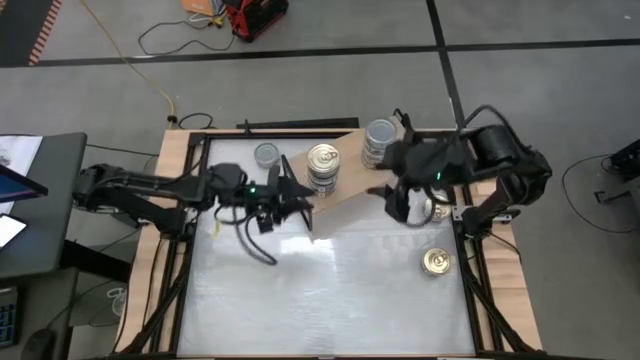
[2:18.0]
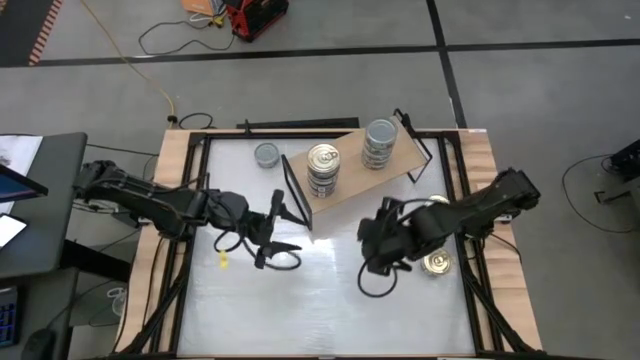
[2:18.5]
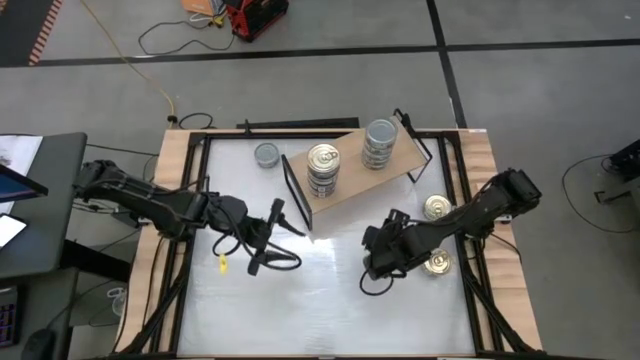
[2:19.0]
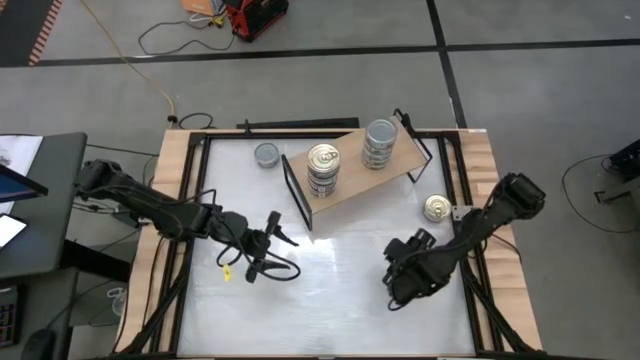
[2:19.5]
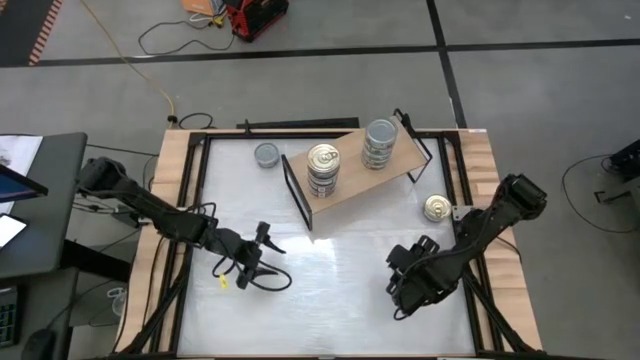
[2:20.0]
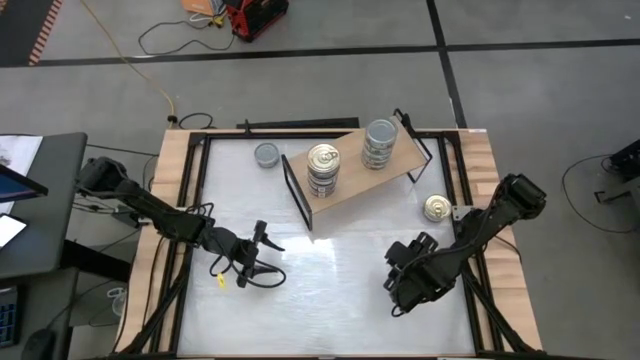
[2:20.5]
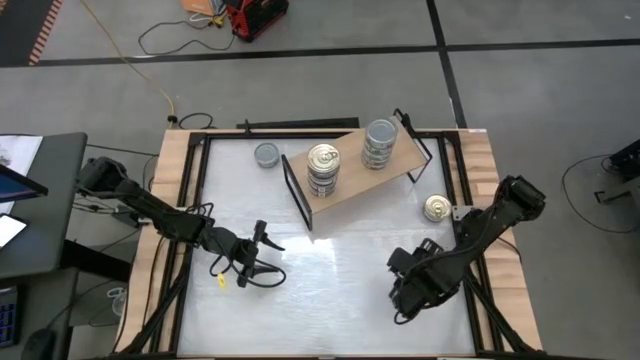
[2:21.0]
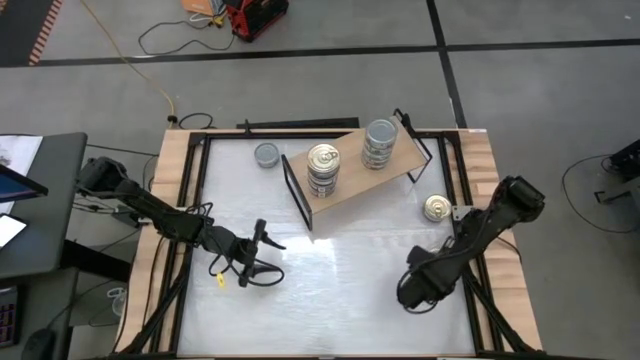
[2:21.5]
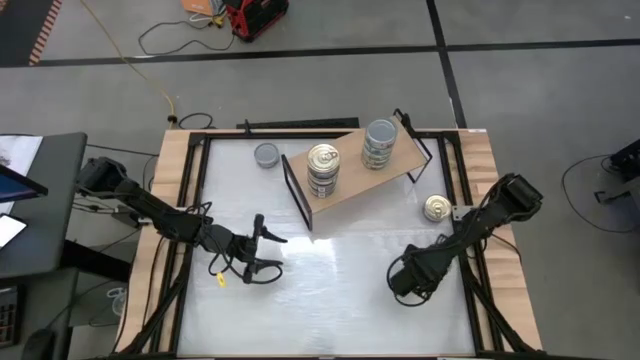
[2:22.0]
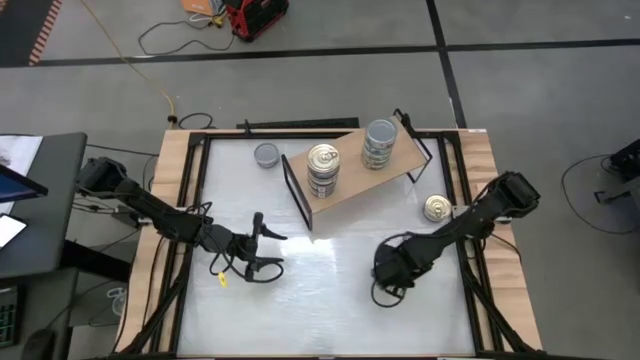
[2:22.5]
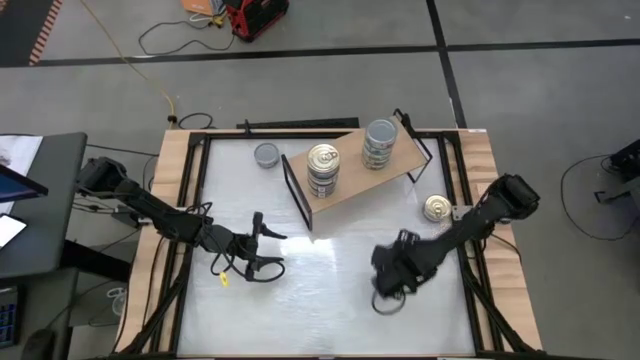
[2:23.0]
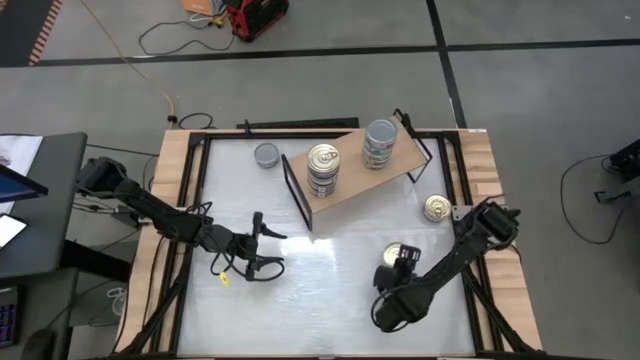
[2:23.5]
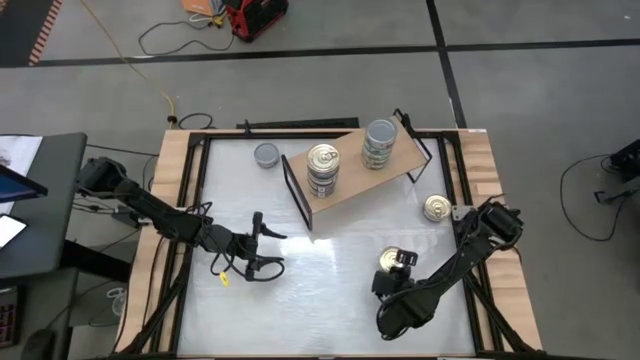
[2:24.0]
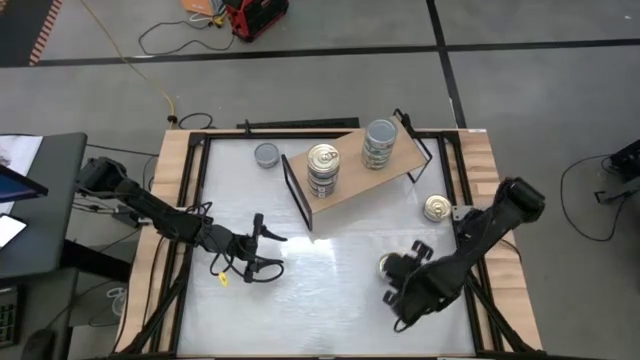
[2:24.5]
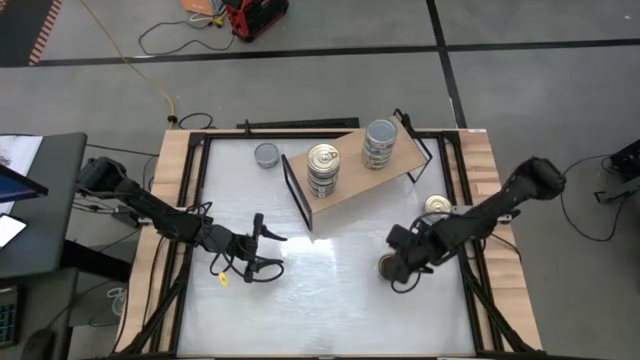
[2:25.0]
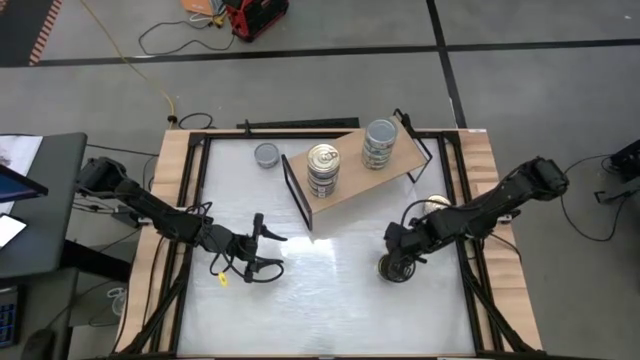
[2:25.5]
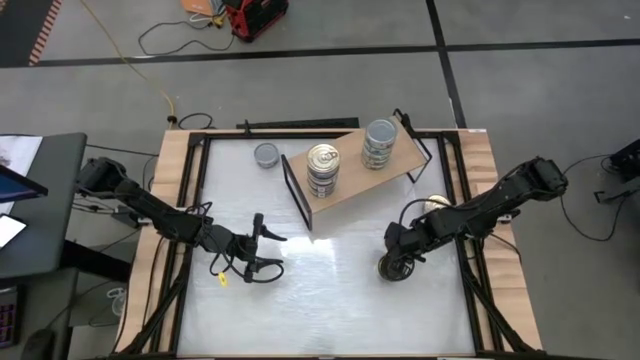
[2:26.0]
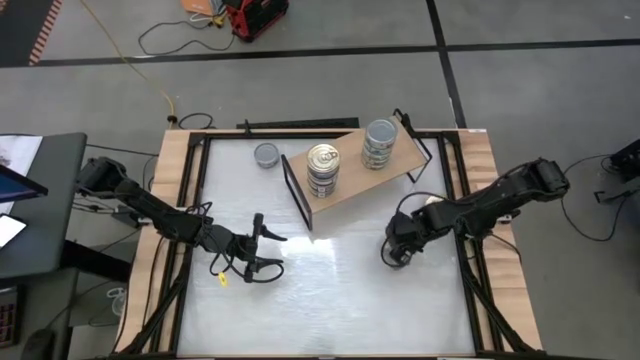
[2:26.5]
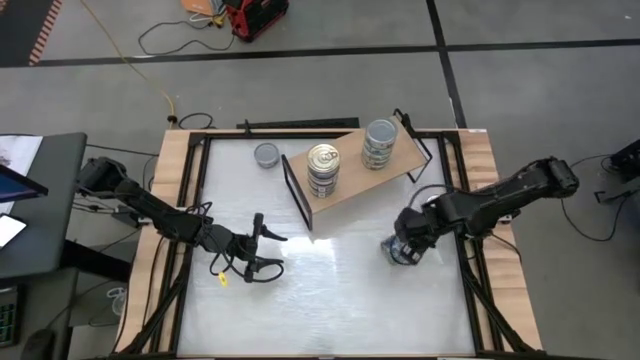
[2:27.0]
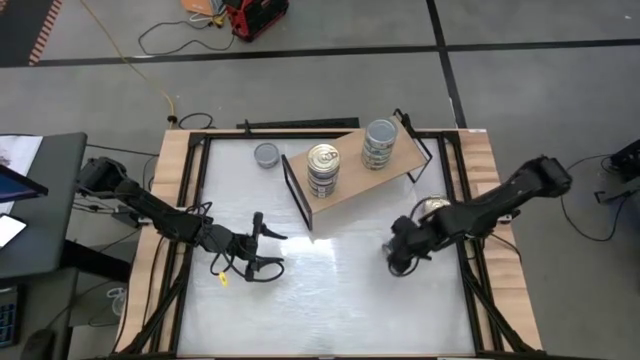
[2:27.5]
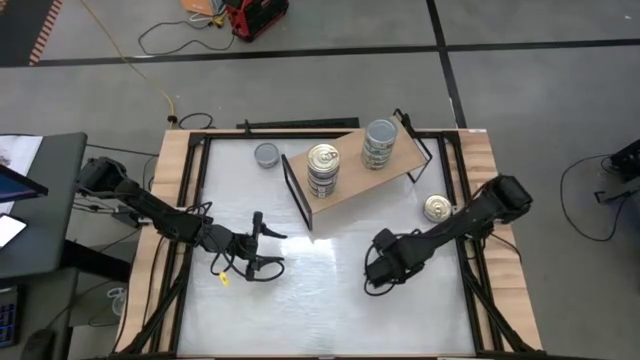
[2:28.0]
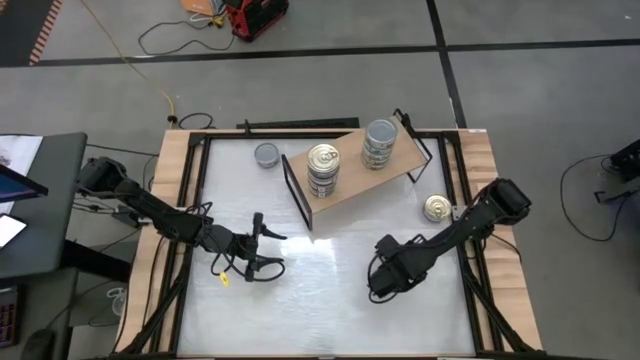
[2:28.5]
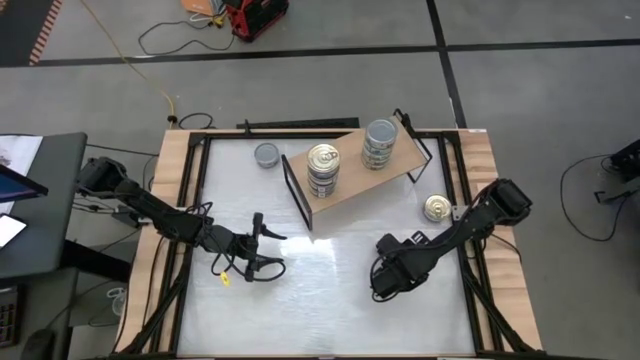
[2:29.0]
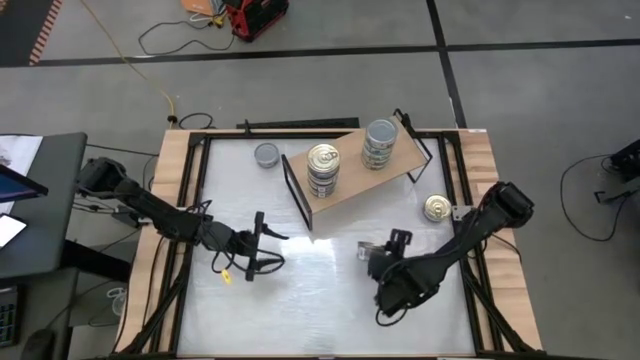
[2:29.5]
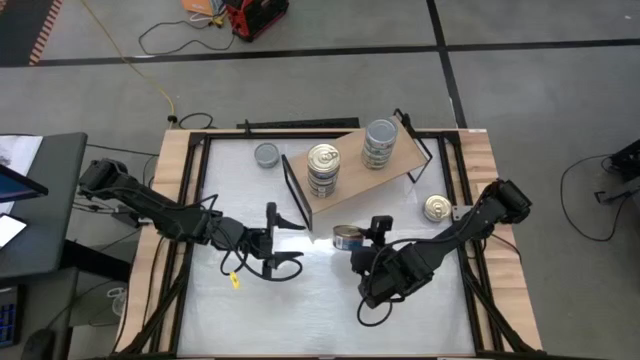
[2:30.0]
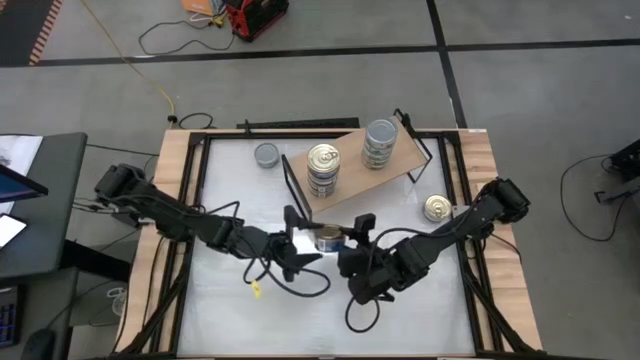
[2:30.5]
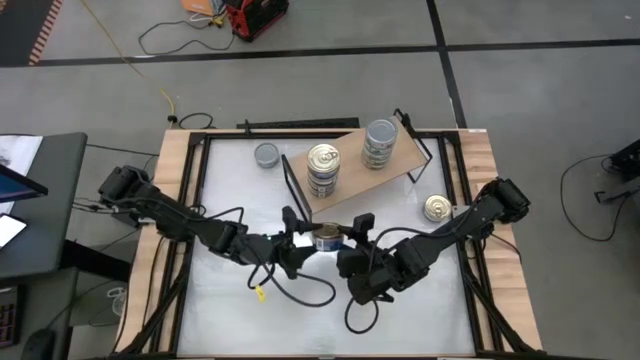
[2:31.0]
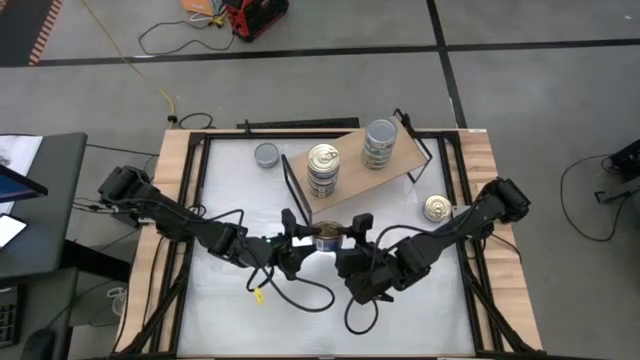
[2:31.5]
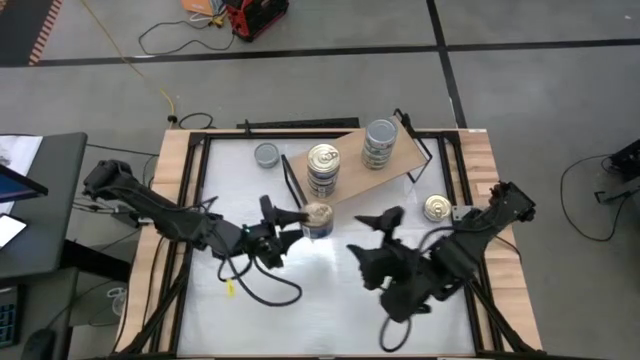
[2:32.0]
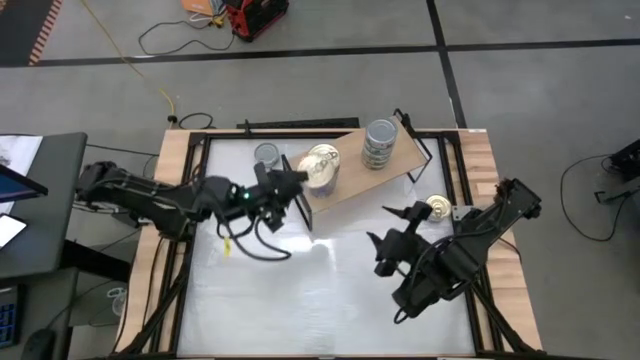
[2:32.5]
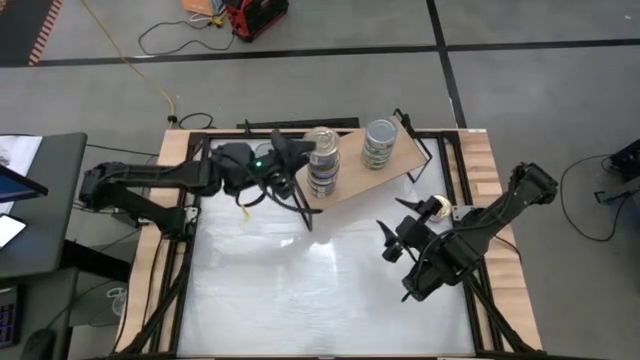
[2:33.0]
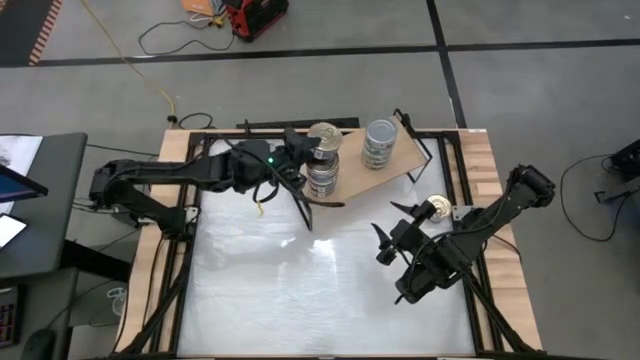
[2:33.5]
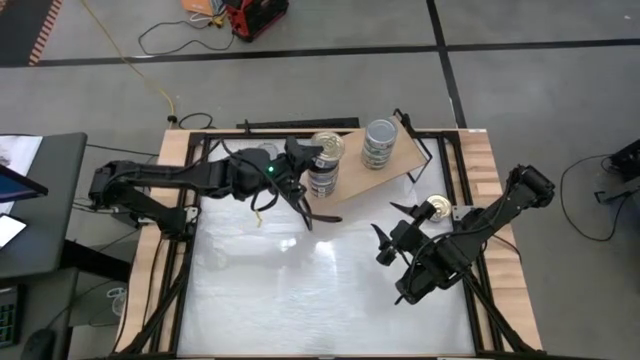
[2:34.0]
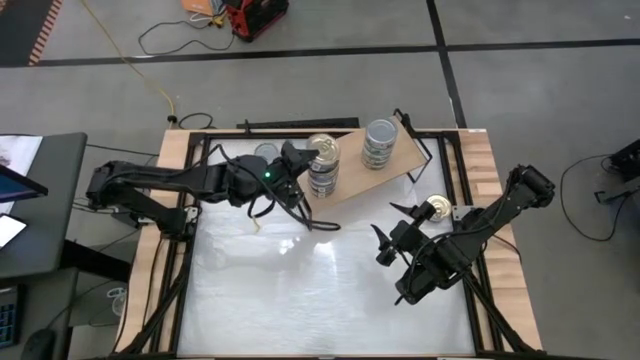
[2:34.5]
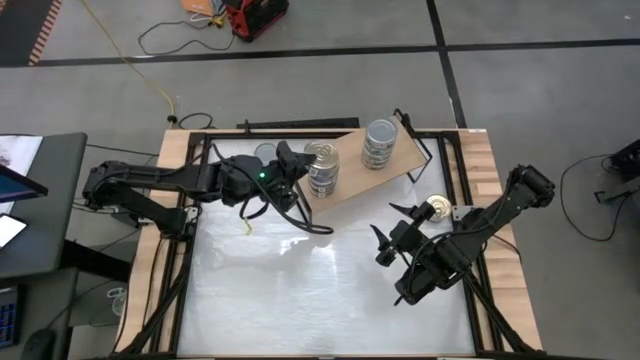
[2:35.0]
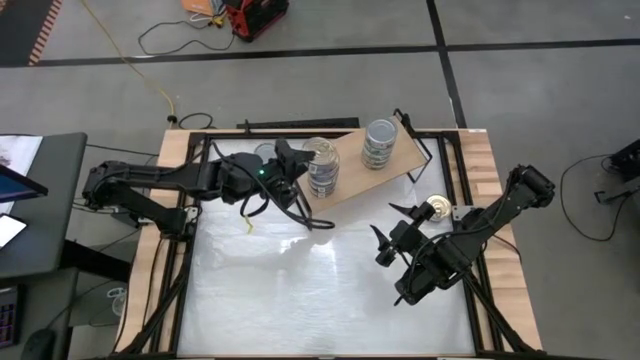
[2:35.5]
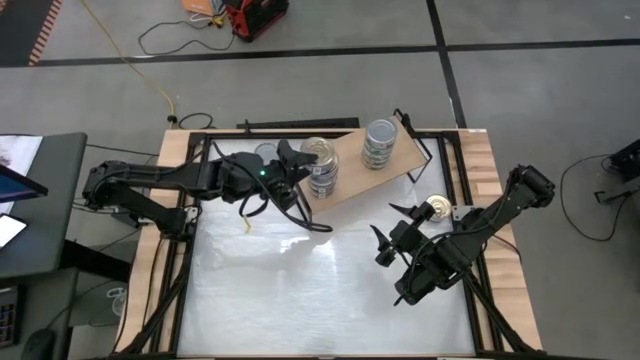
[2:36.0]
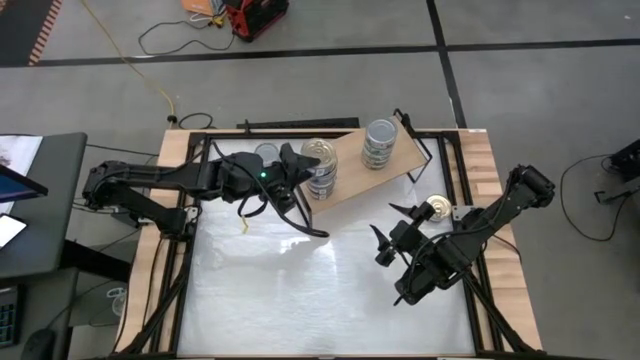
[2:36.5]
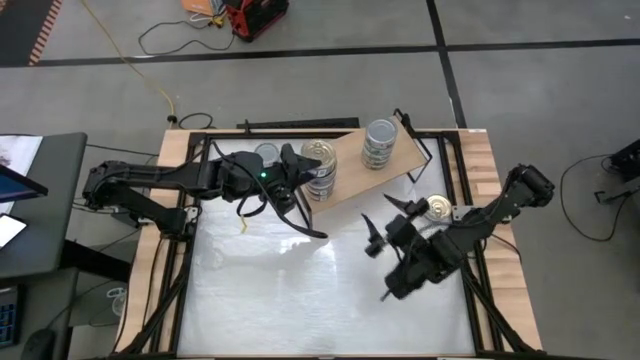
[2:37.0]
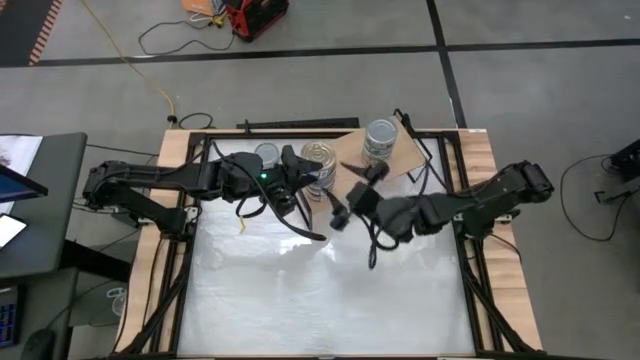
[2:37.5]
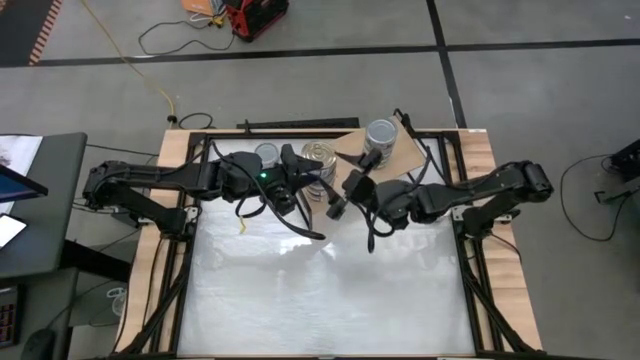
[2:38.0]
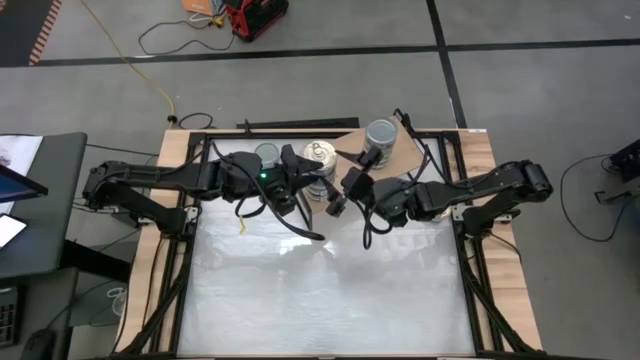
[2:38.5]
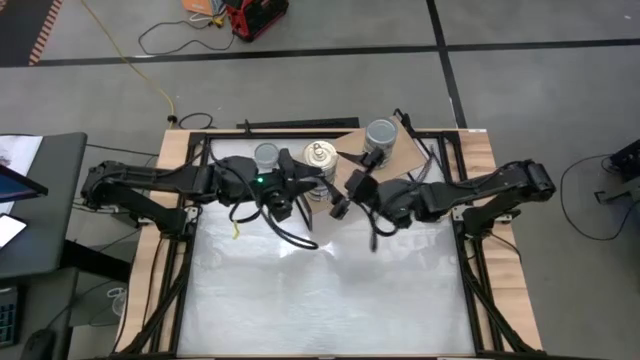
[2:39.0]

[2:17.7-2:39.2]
Task: Stack canned seafood by type on shelf
Stack the blue tuna can on top of the blue tuna can
